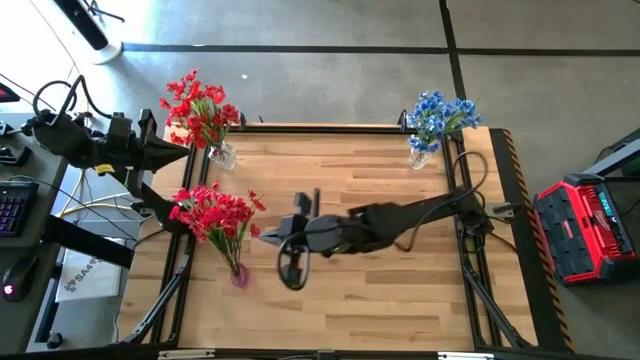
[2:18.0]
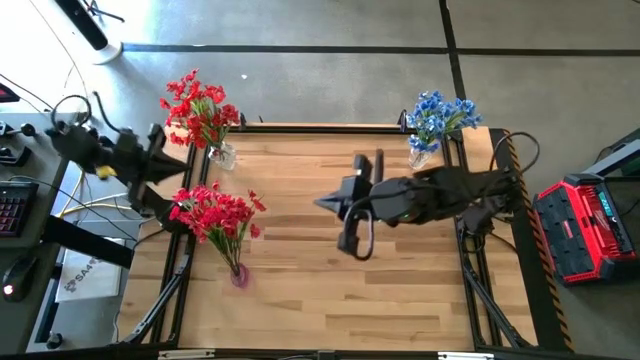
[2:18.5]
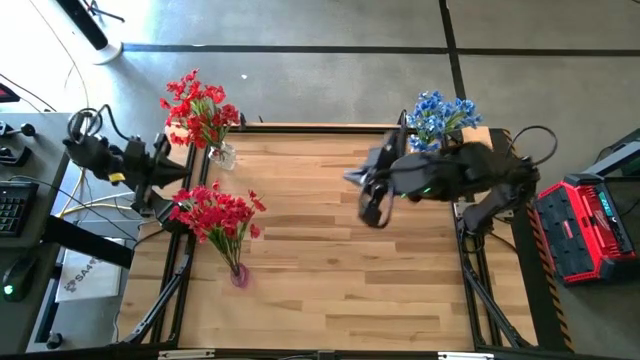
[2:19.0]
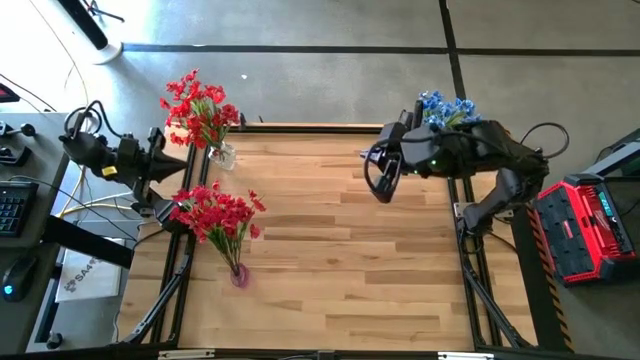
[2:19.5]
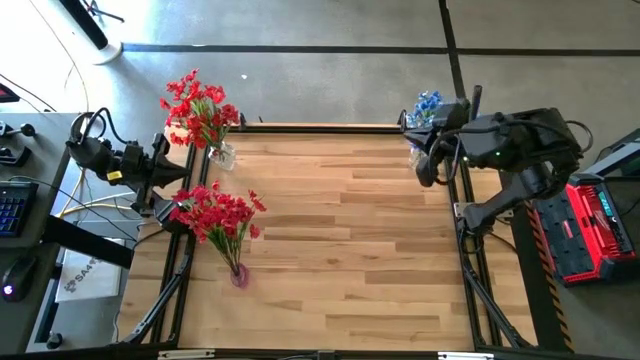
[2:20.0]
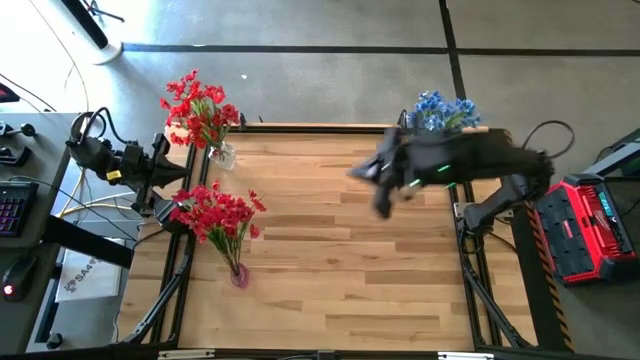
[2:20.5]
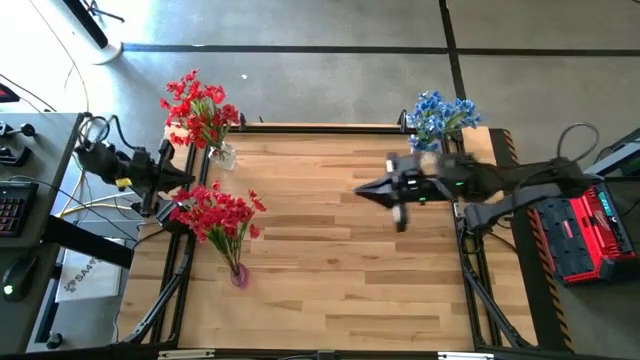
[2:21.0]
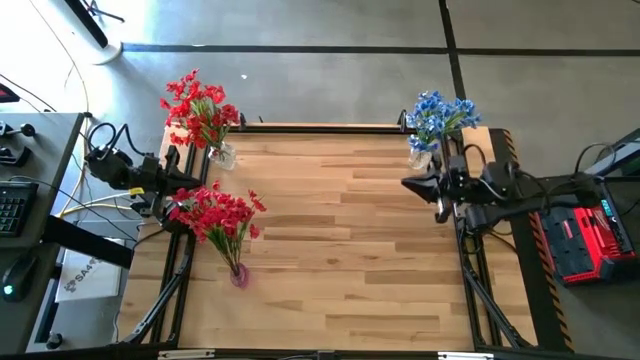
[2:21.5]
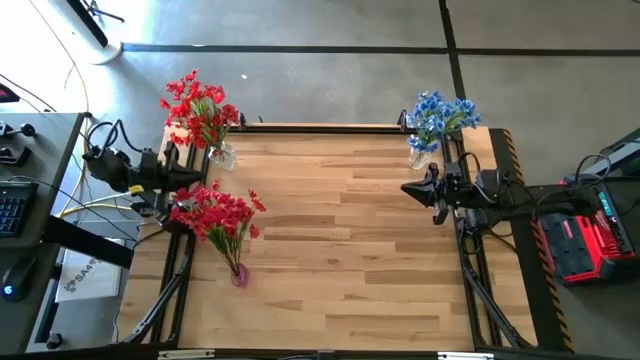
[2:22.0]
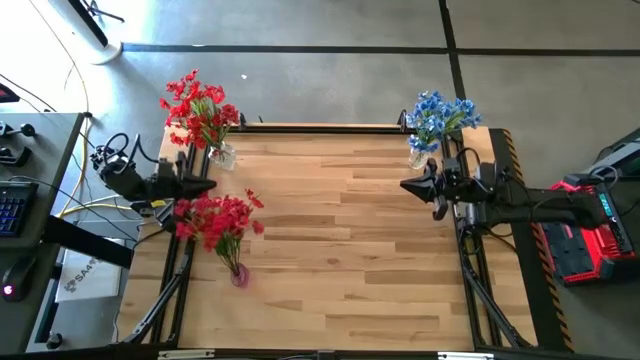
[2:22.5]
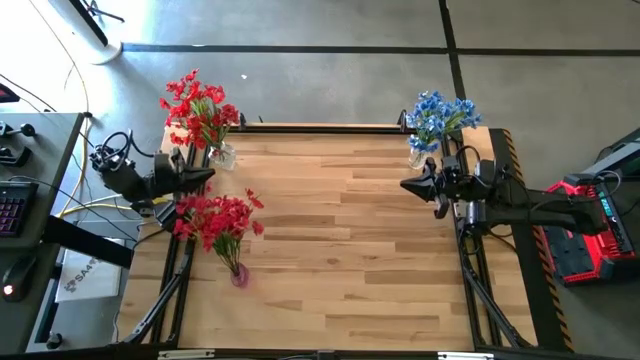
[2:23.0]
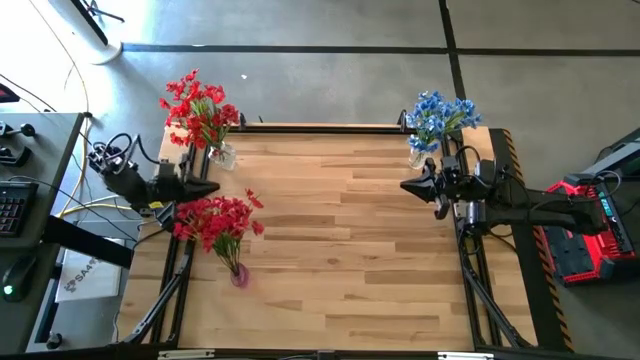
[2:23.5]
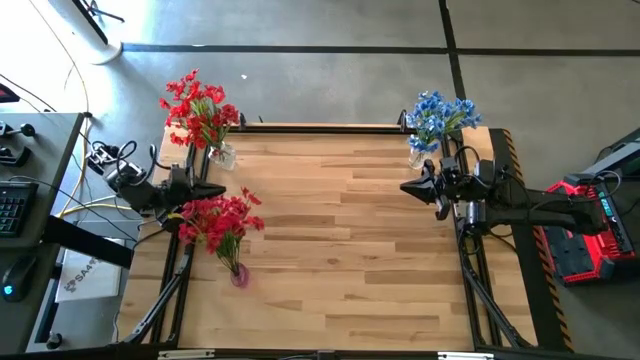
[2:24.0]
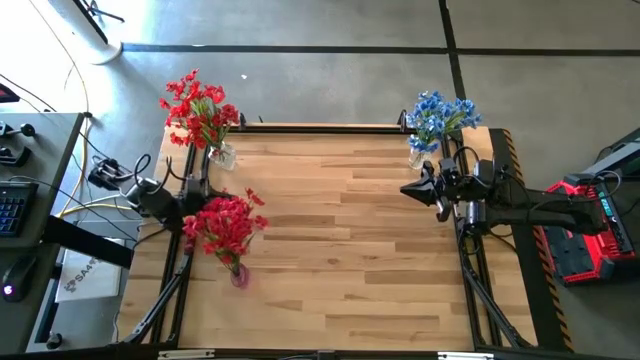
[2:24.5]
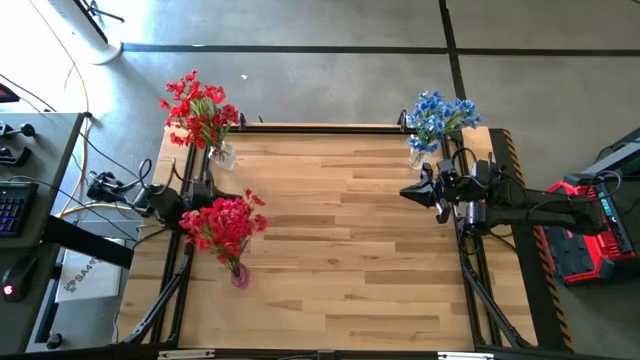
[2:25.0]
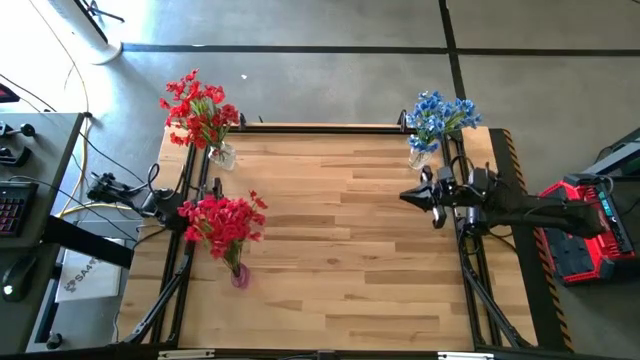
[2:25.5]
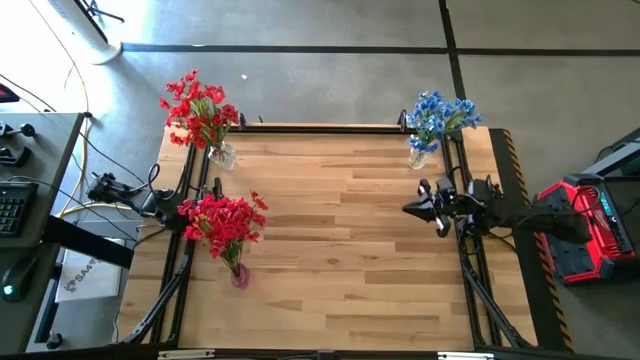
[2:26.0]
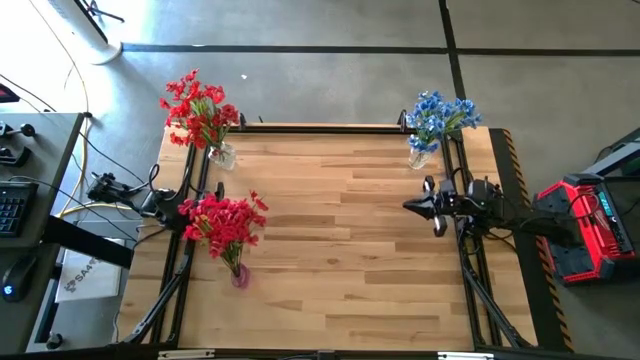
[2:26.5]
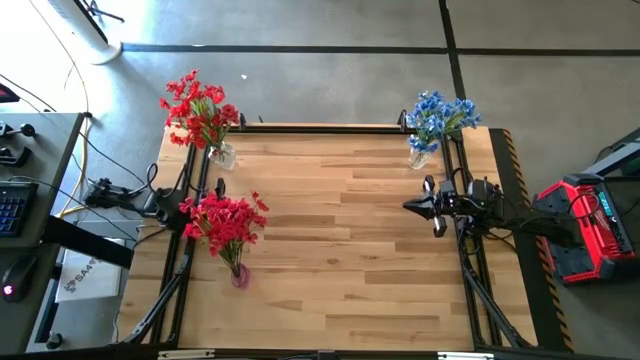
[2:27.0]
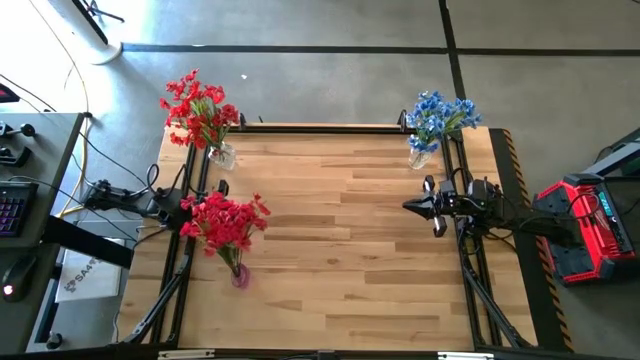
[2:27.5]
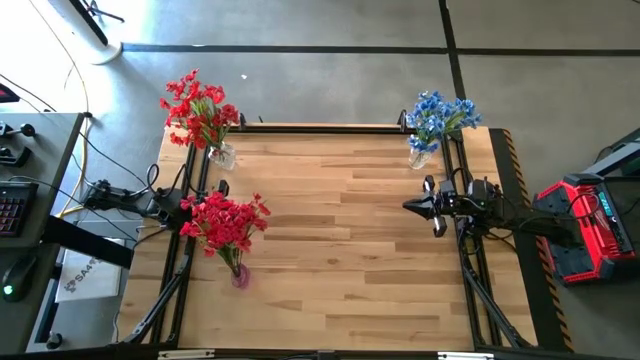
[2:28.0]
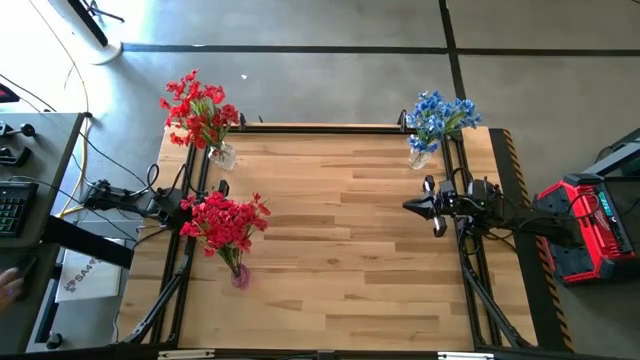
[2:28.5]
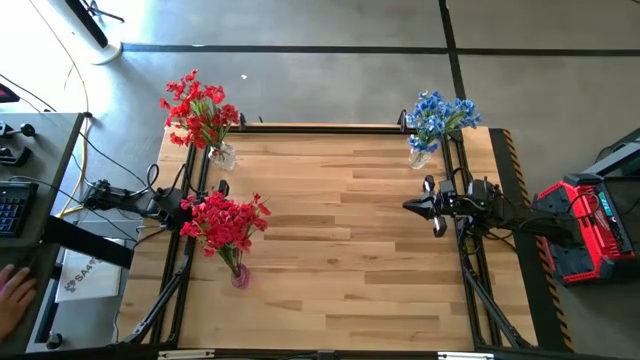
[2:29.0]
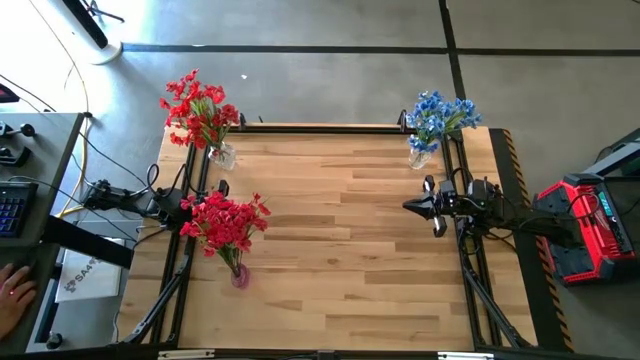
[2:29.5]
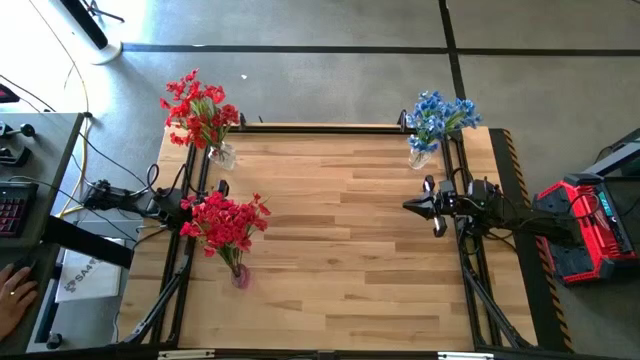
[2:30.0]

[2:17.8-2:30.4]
Task: Sort flowers into vase by color
Return to Home Position

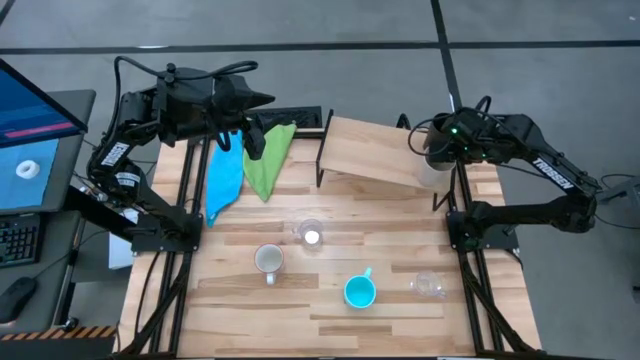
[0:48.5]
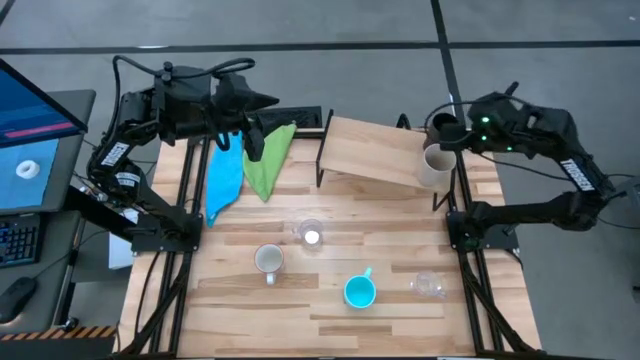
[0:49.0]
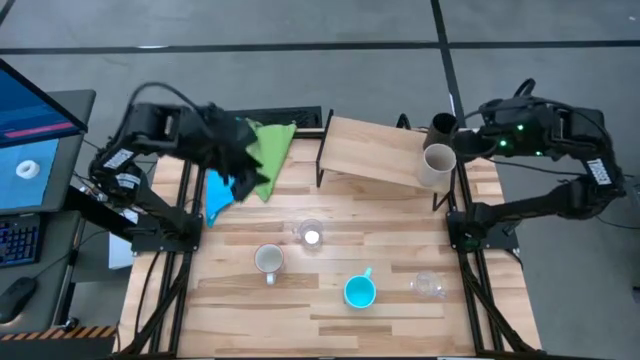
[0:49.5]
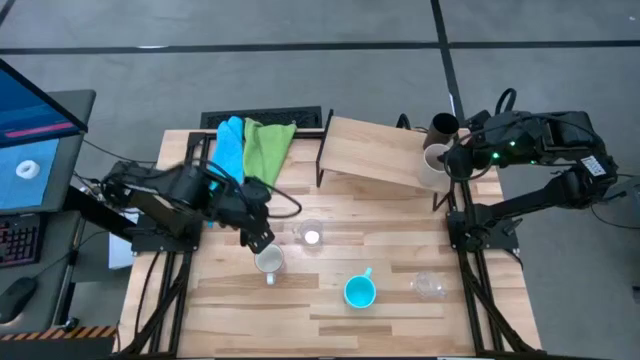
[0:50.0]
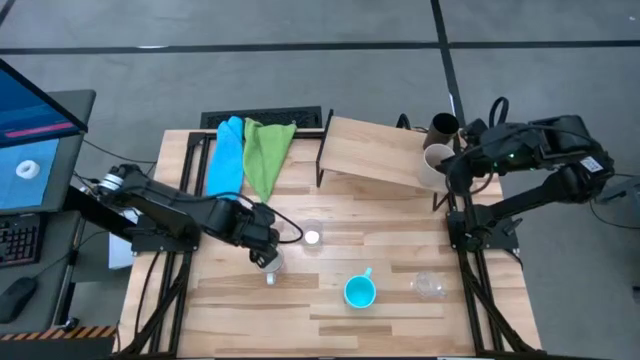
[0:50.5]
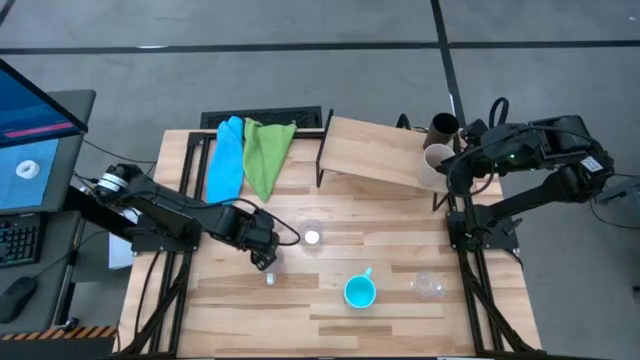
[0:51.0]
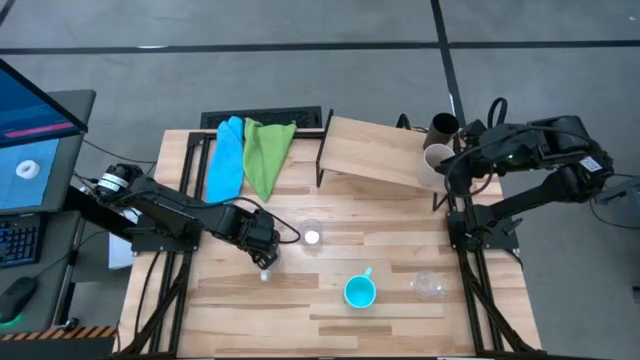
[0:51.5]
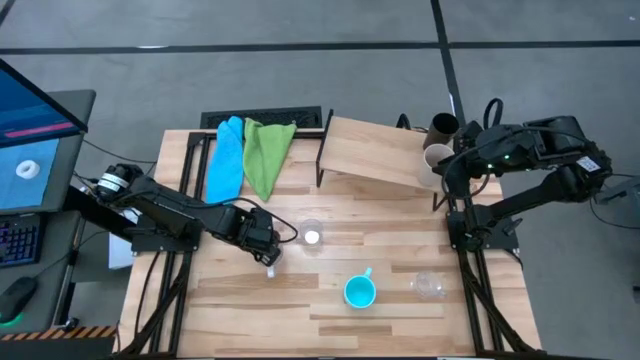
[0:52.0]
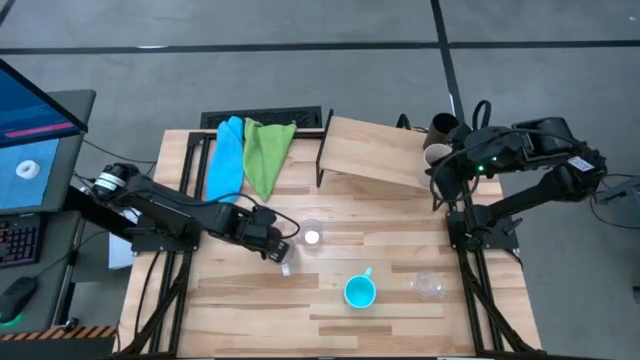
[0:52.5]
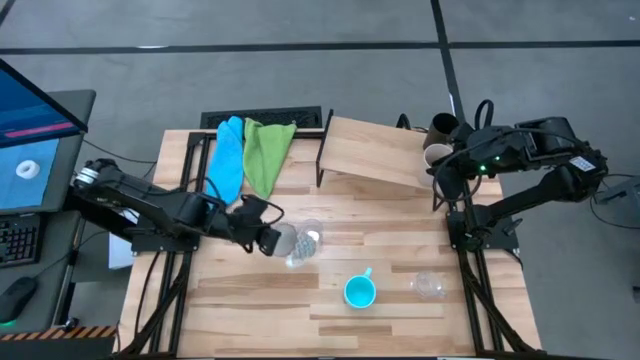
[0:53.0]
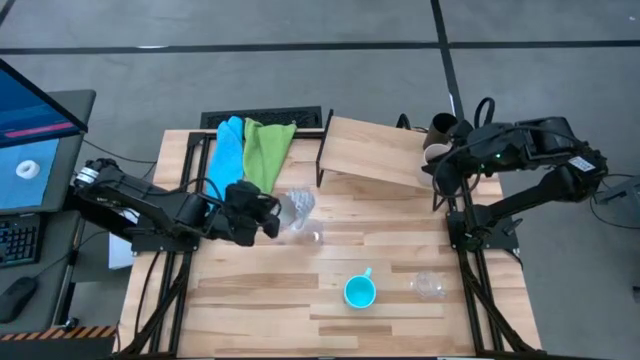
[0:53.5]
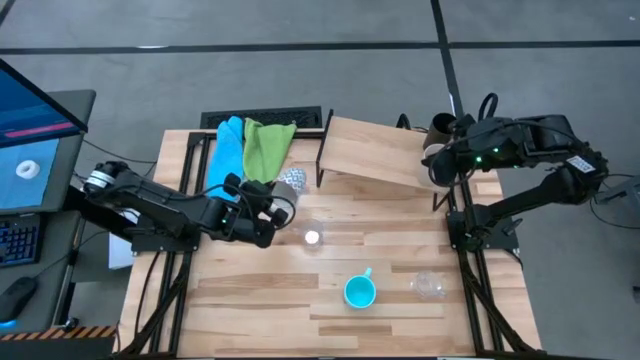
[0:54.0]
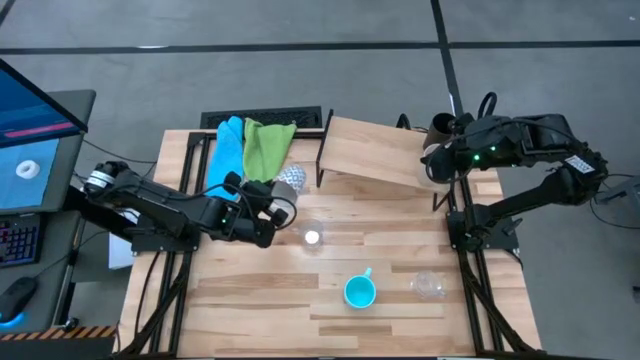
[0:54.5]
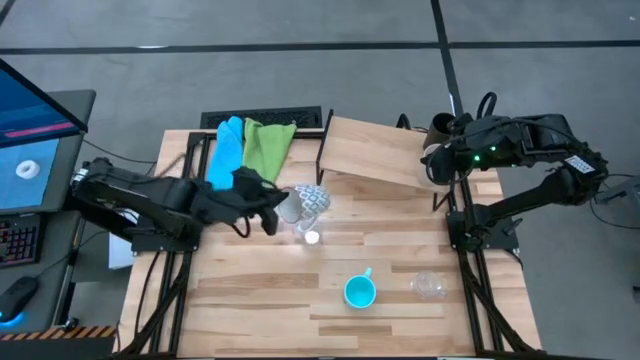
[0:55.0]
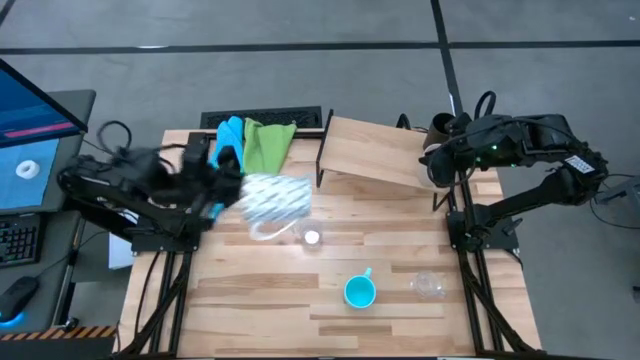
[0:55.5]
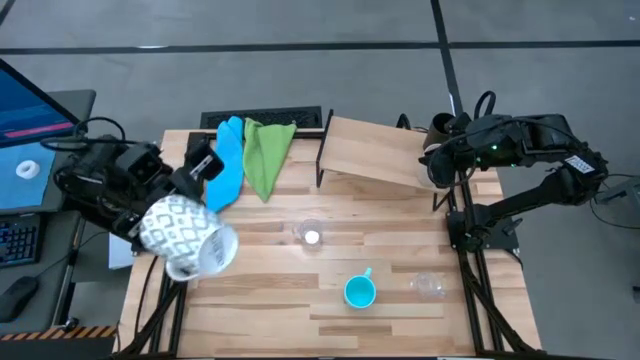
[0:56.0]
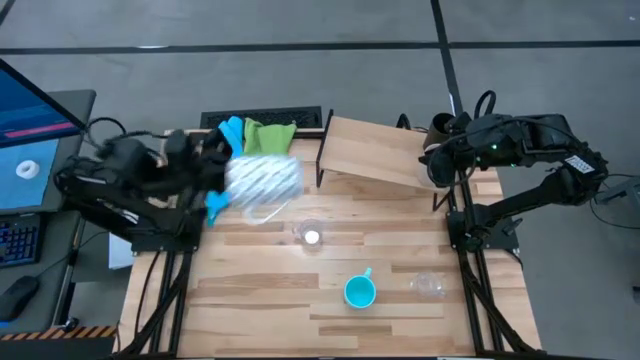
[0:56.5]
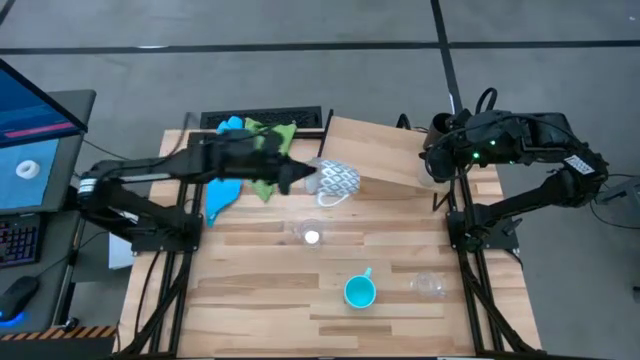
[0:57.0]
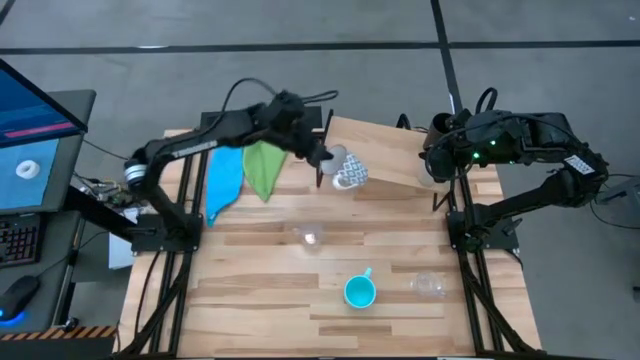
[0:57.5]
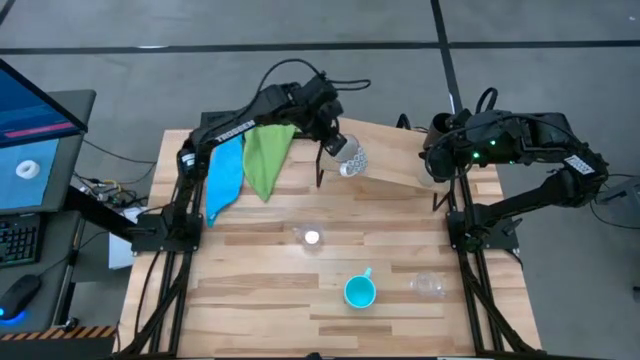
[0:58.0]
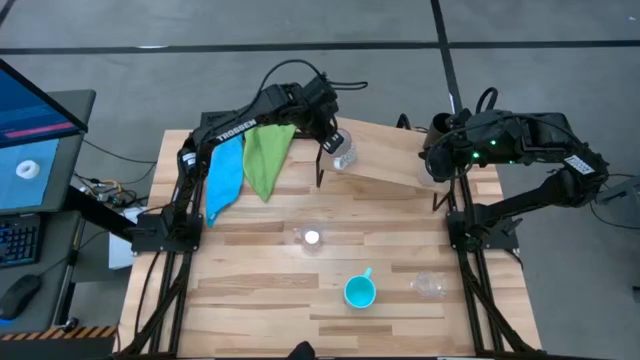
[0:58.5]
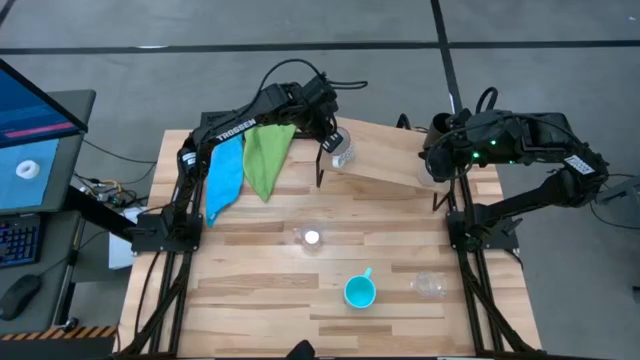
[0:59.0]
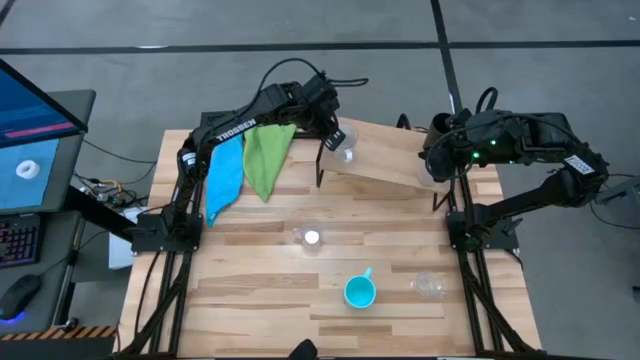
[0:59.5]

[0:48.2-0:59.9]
Task: Stack small to large cups/mugs on shelf
Put the white patterned mug on the shelf
